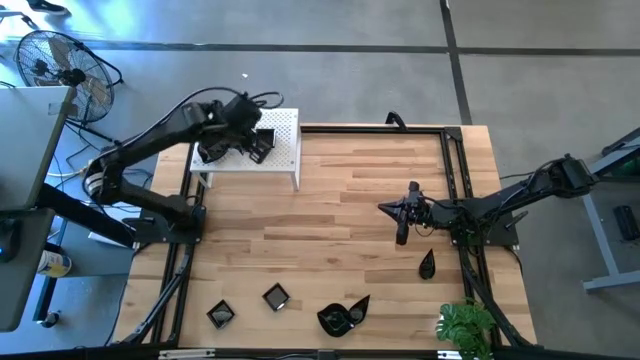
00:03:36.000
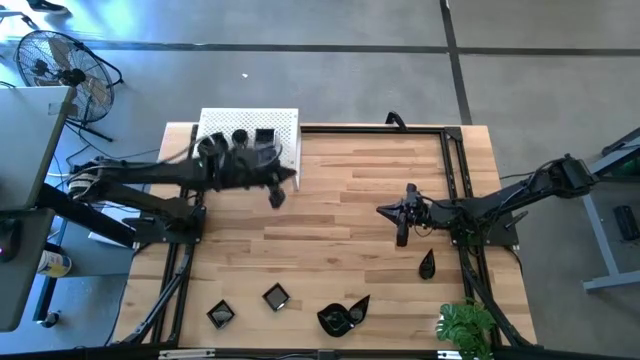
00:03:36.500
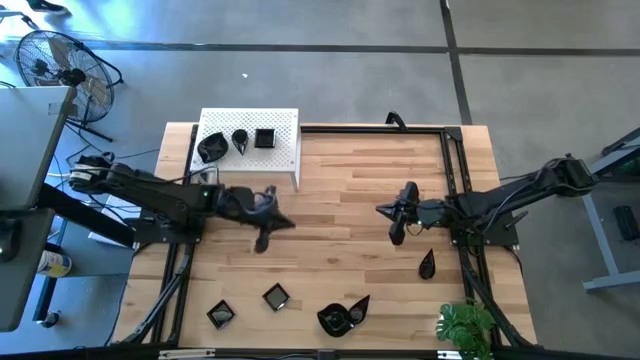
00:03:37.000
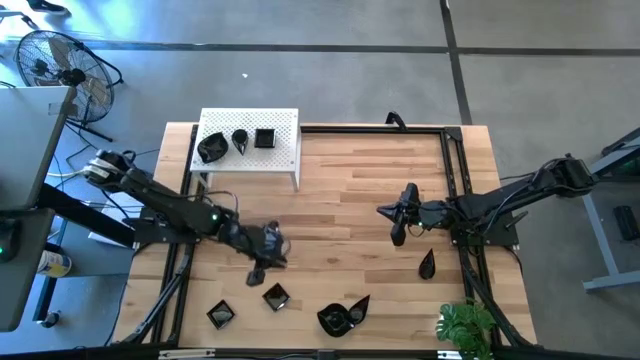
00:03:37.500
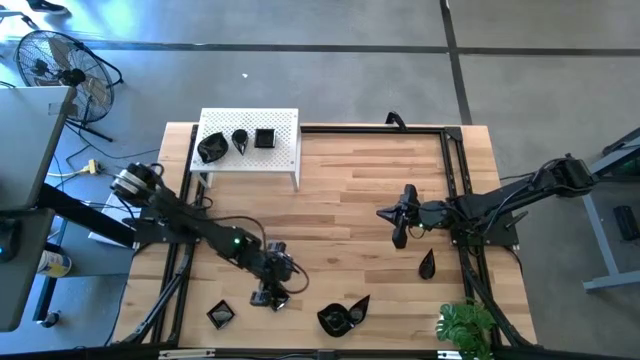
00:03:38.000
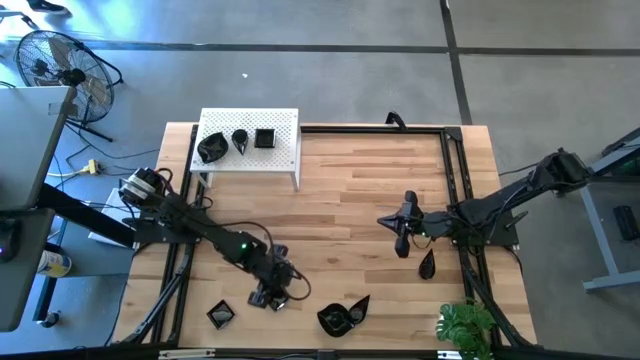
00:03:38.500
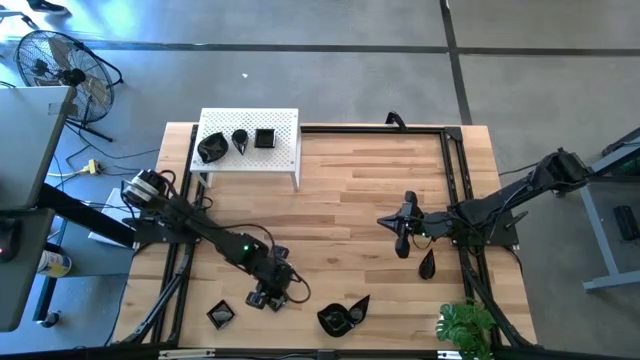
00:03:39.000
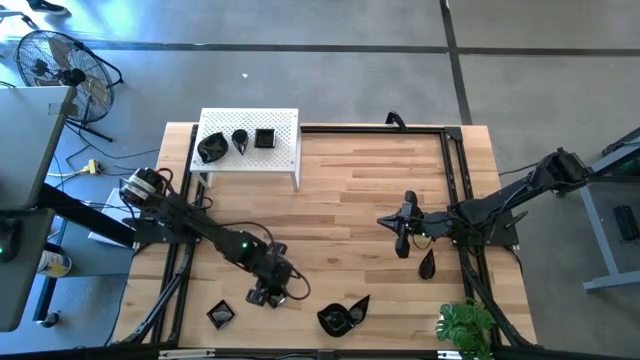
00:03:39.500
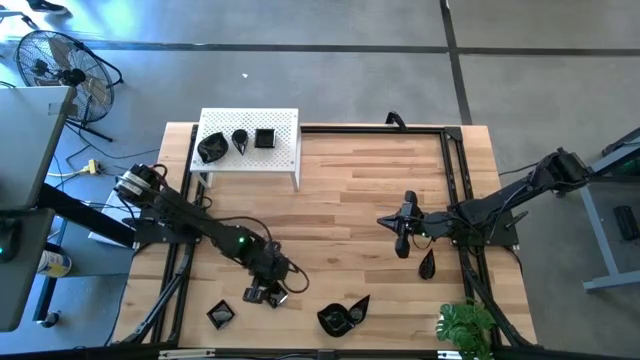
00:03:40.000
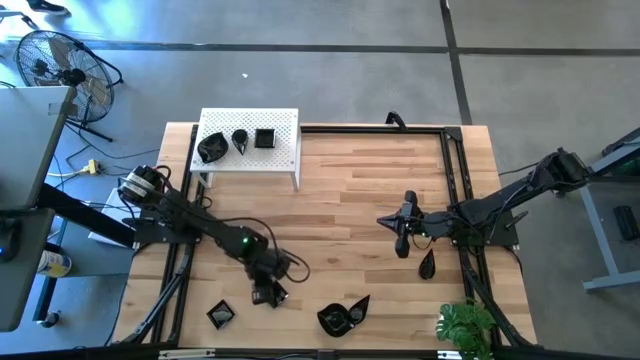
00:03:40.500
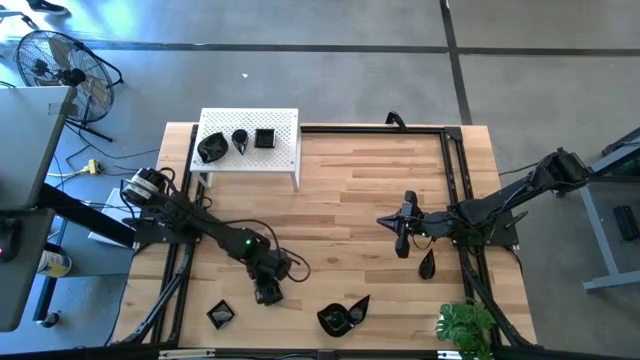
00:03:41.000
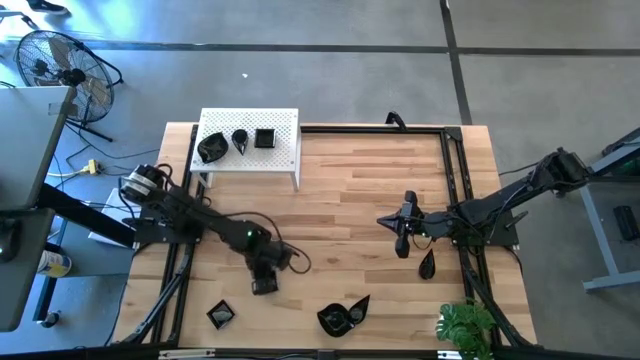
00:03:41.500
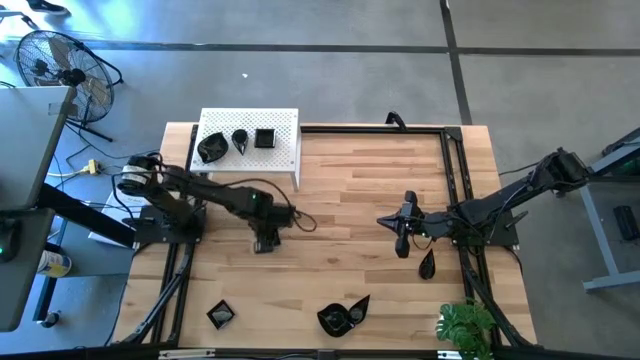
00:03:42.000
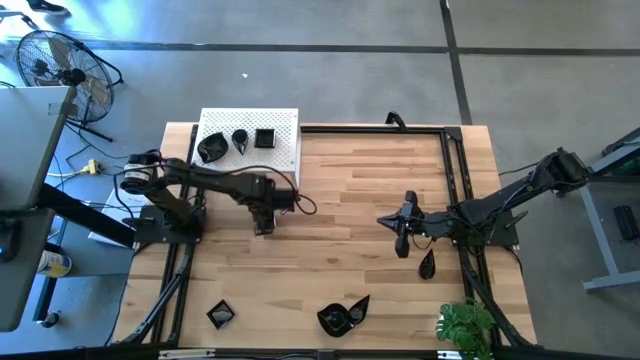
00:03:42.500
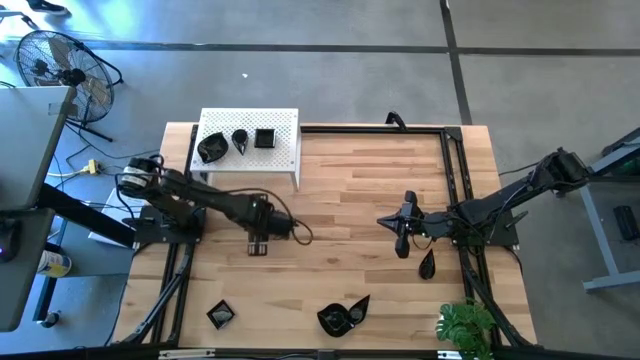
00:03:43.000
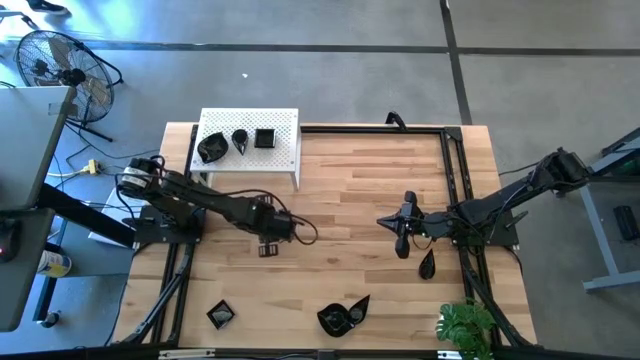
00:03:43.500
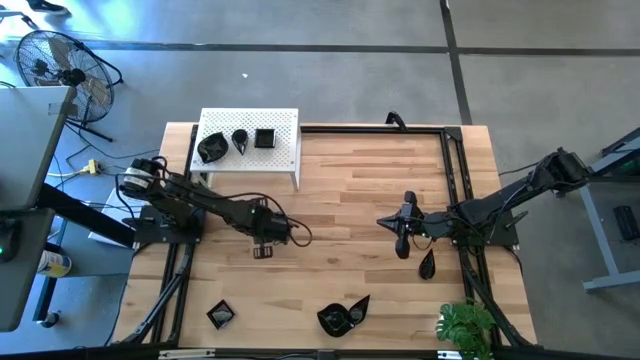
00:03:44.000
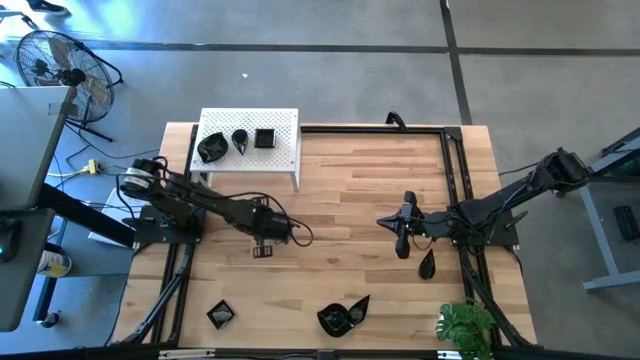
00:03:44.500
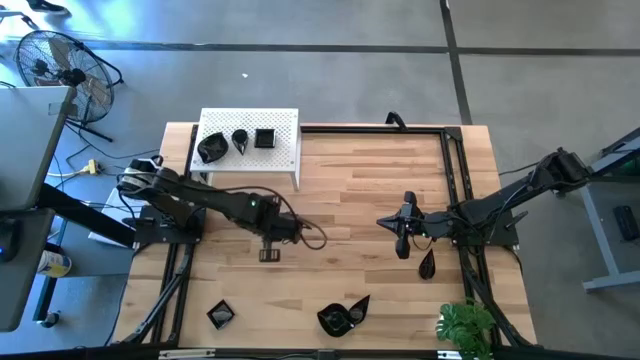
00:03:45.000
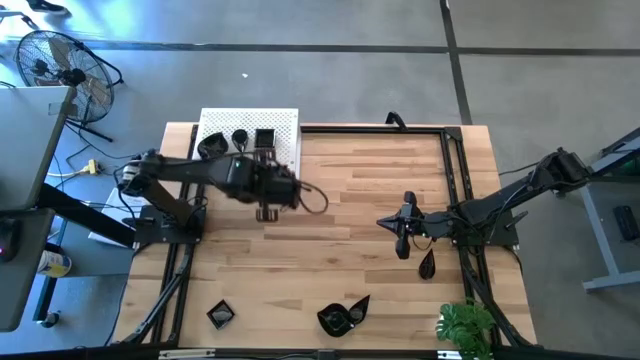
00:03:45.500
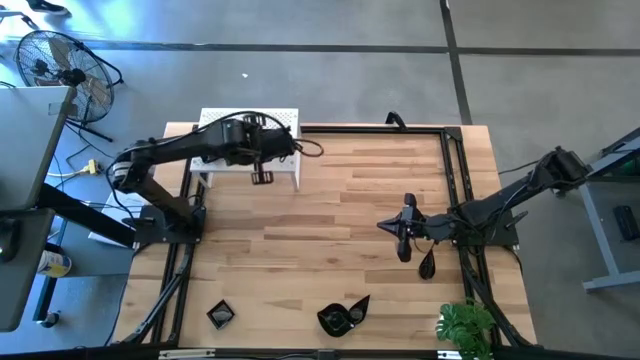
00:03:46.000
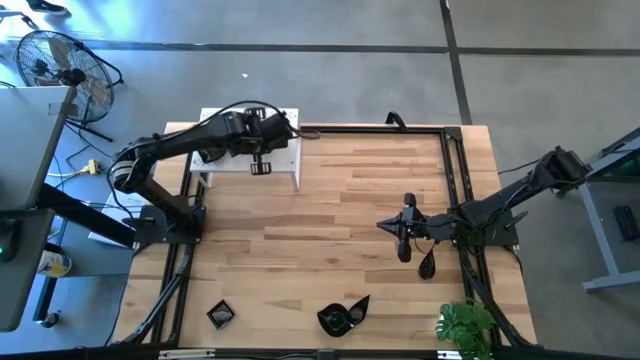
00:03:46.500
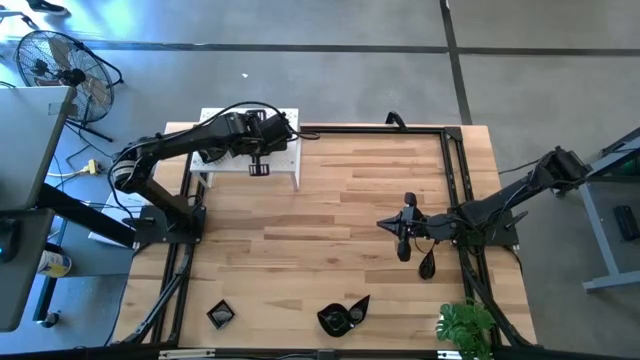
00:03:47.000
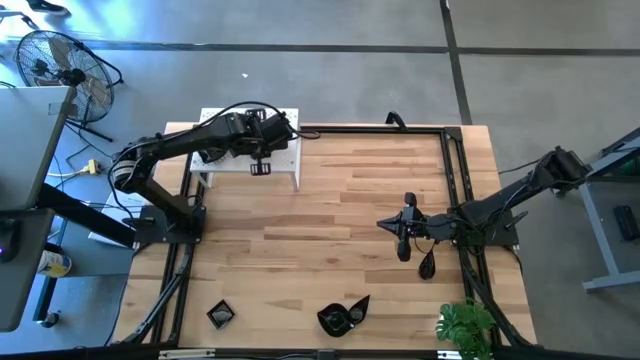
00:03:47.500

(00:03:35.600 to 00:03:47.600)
Task: Pick & Place Mini shaped plates
Stack the right black square plate on the top of the stacked black square plates on the shelf

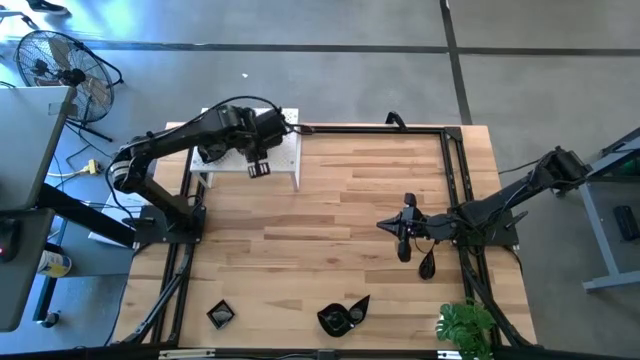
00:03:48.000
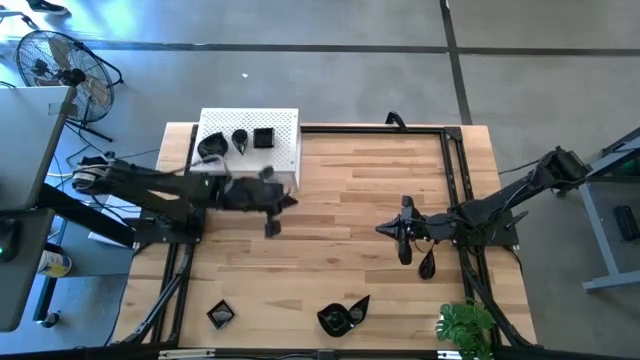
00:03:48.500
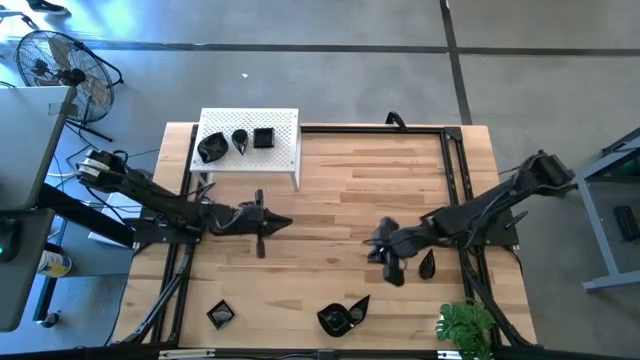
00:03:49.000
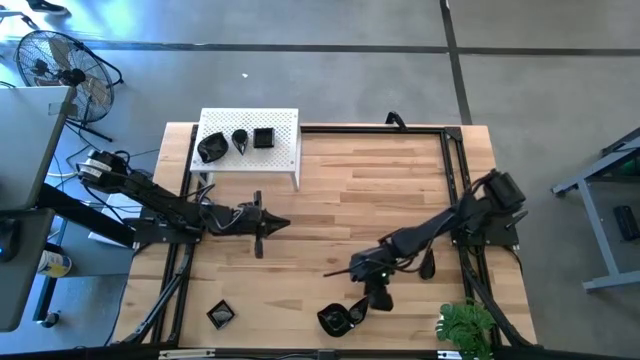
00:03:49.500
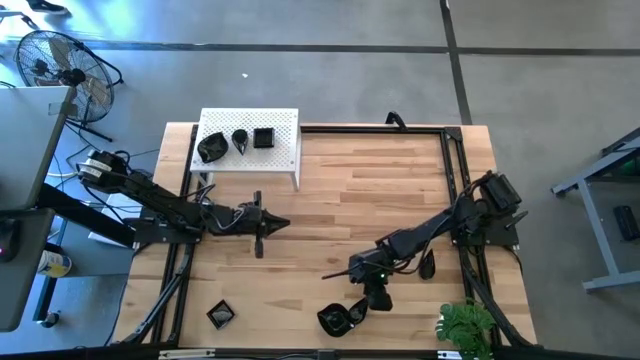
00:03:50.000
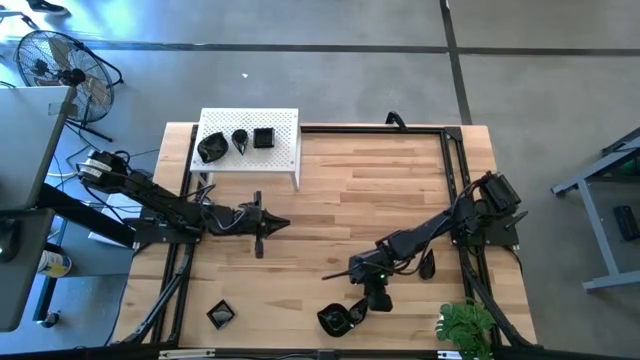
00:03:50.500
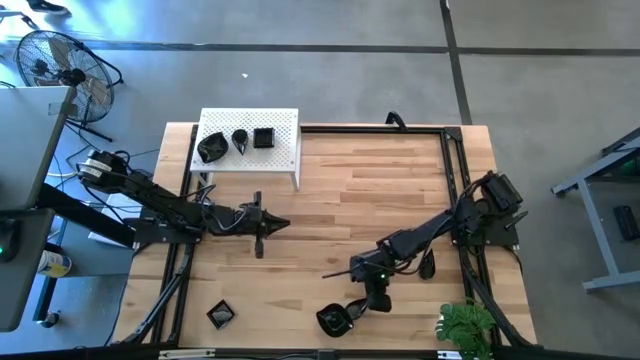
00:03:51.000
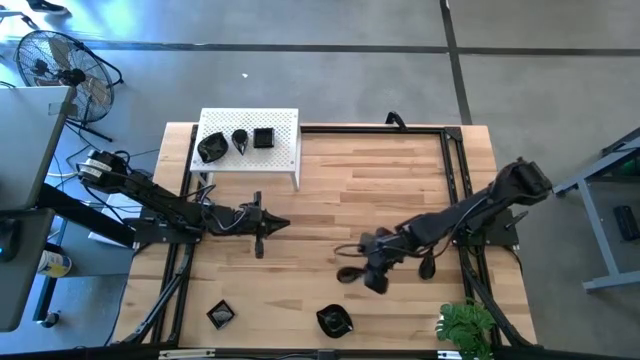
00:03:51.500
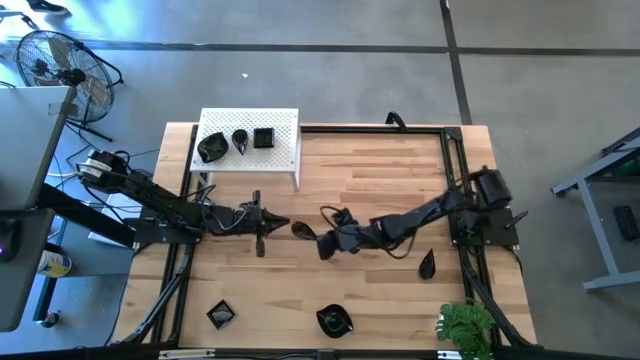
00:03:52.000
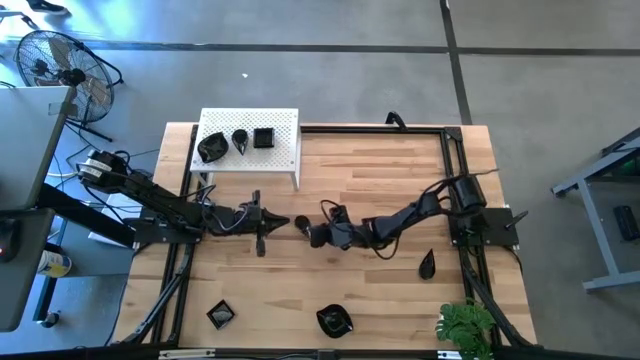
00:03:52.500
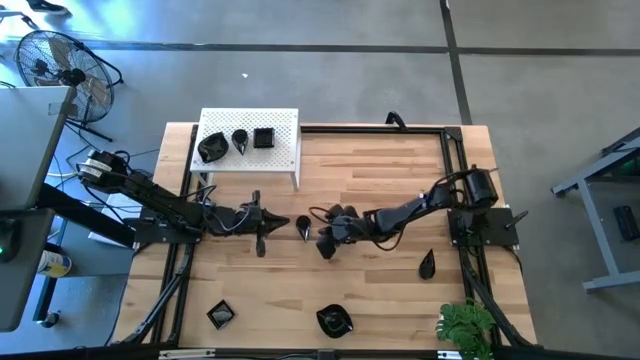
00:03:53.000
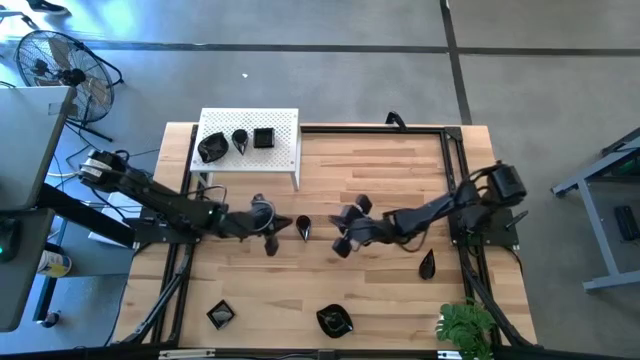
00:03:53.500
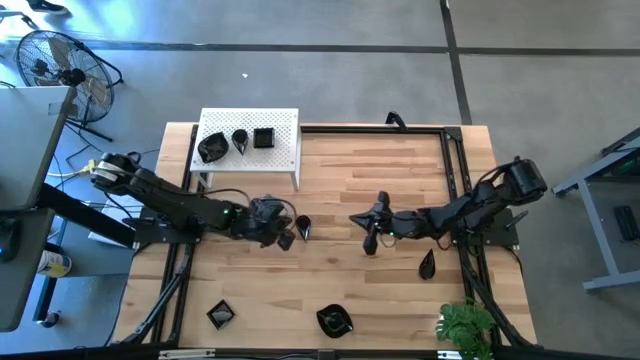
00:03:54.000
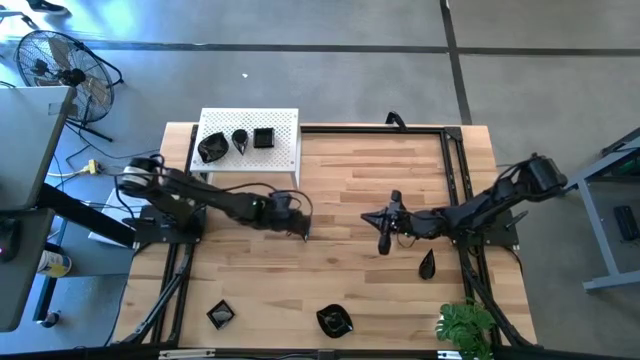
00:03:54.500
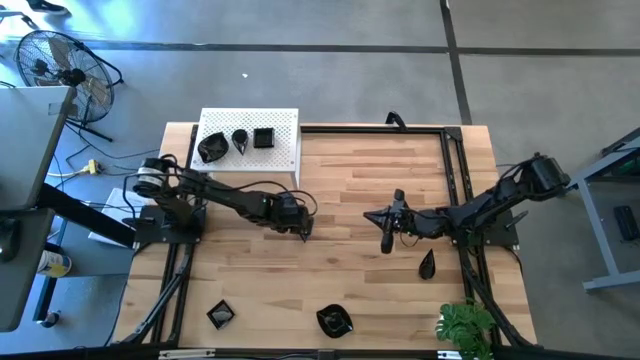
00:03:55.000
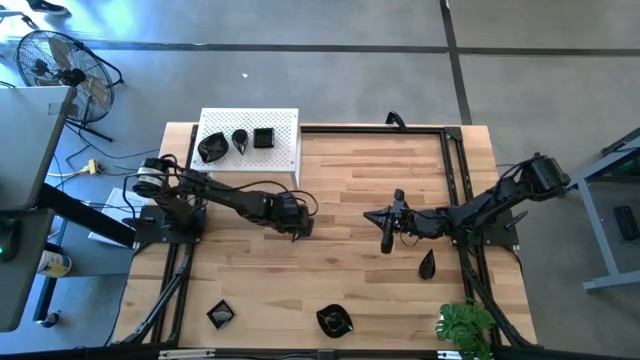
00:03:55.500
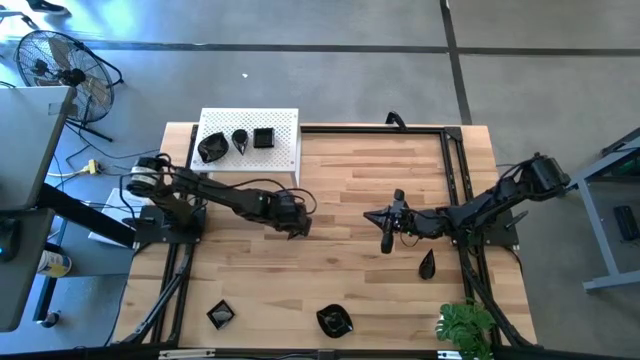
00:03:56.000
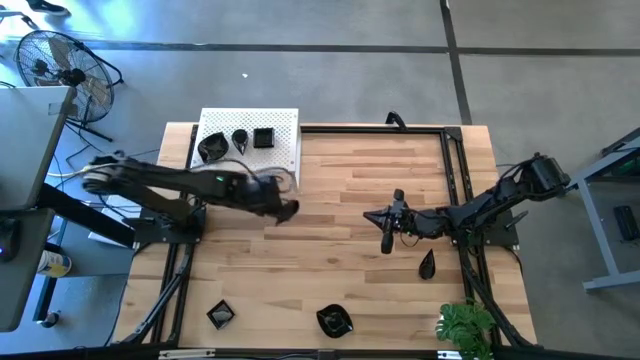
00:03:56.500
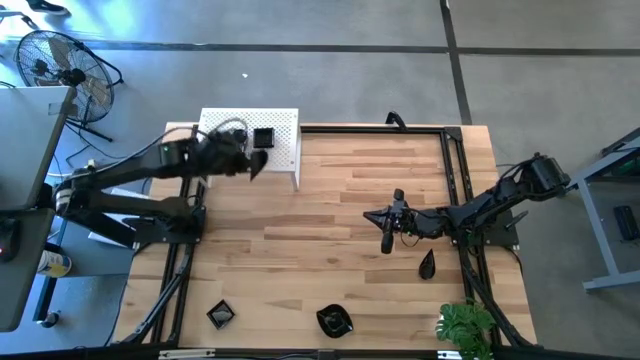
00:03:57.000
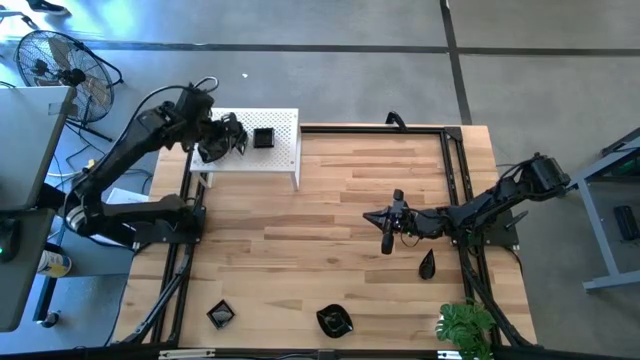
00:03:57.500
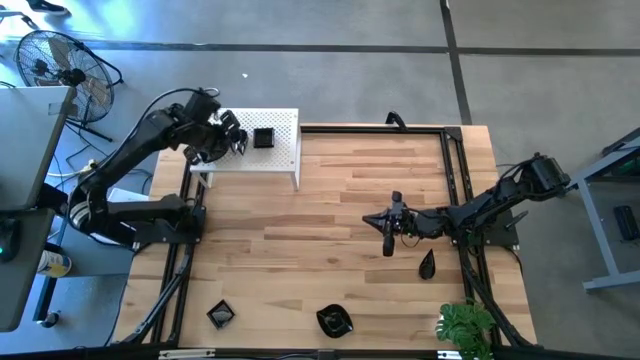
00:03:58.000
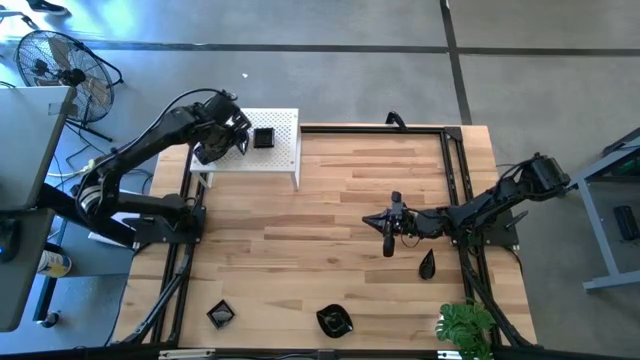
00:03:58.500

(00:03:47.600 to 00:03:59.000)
Stack the bottom black drop shaped plate on top of the stacked black drop shaped plates on the shelf
